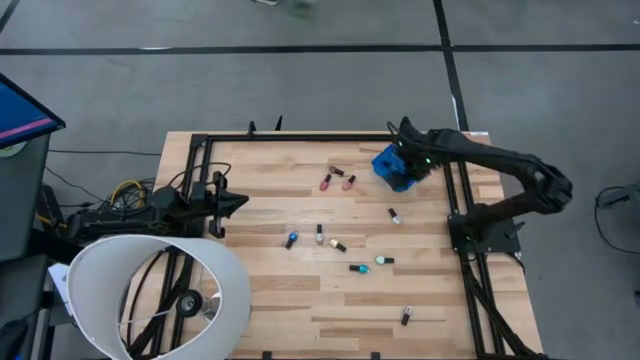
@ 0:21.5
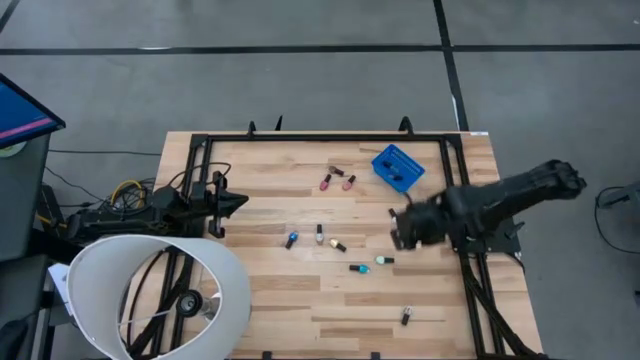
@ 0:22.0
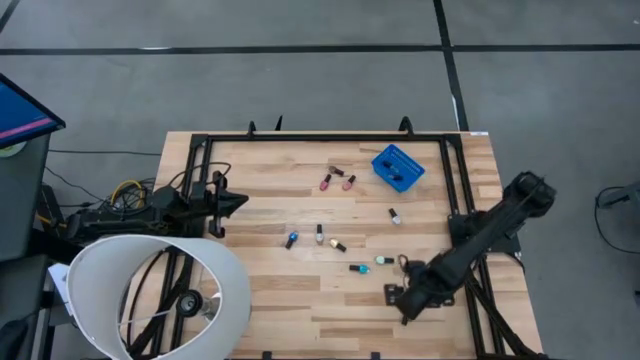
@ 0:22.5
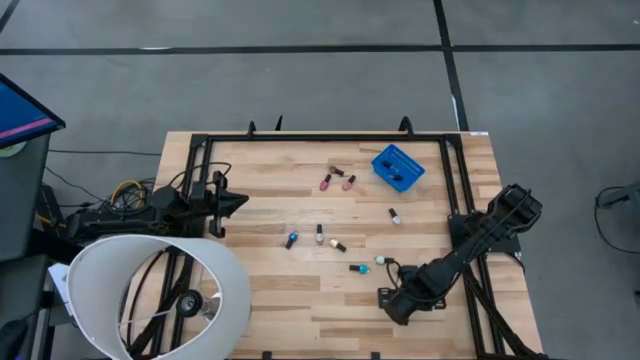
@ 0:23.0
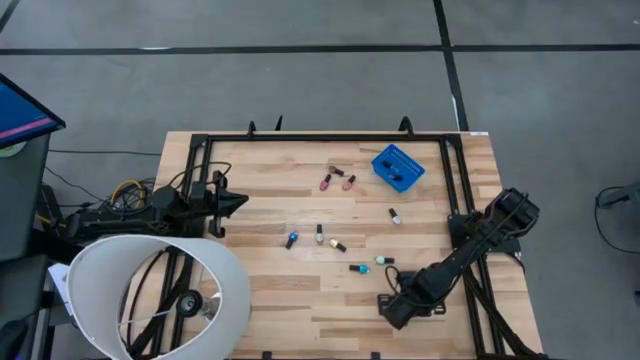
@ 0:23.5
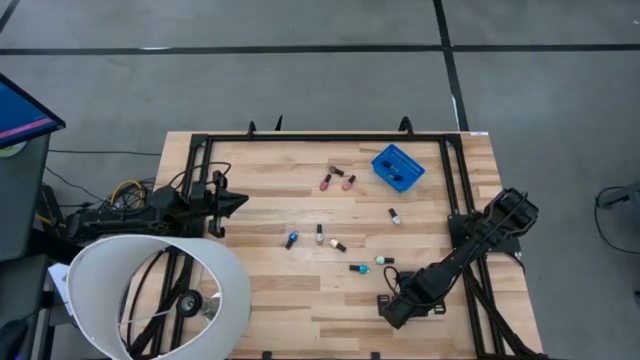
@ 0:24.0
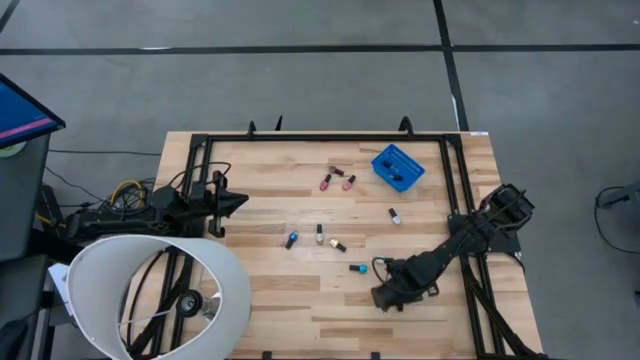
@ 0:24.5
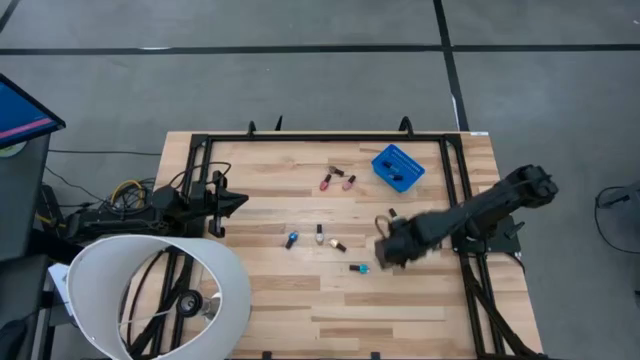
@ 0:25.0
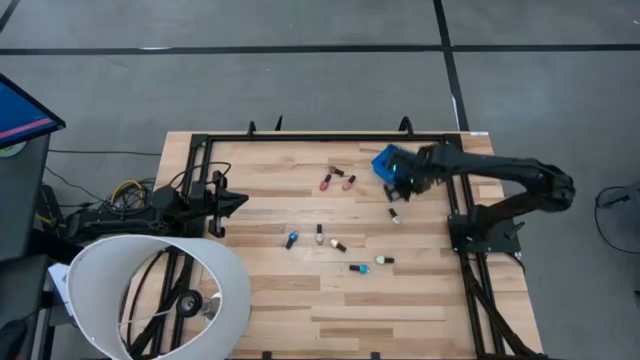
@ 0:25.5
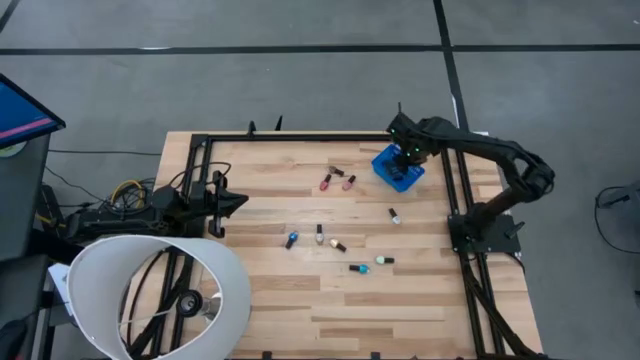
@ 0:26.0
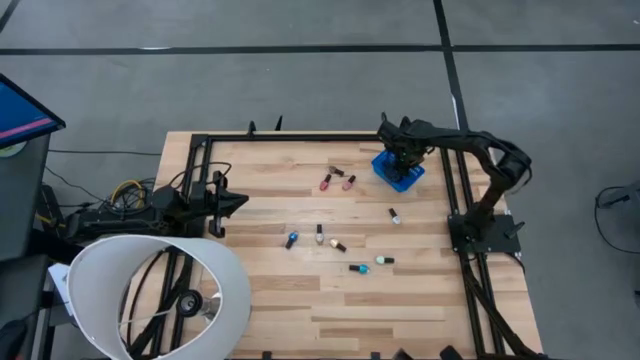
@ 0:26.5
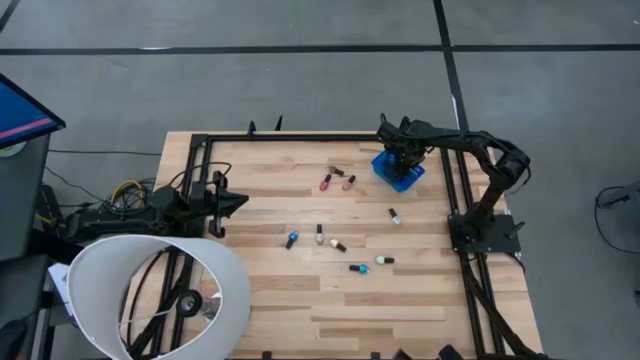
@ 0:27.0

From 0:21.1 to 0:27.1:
Task: Pick & Place Nail Polish
Put the transparent nail polish bottle into the blue bin

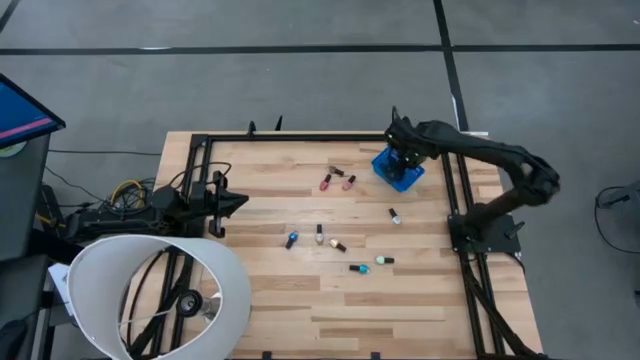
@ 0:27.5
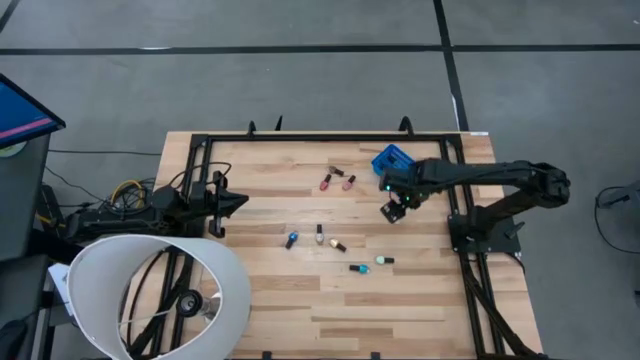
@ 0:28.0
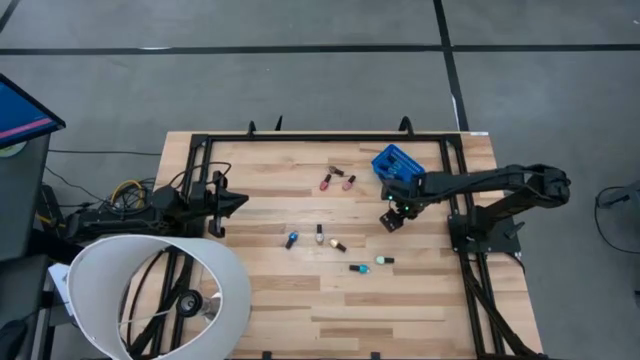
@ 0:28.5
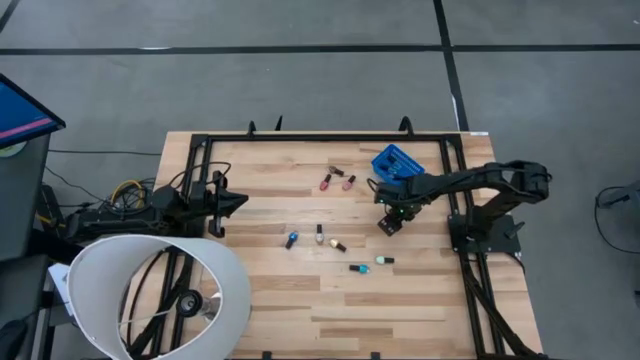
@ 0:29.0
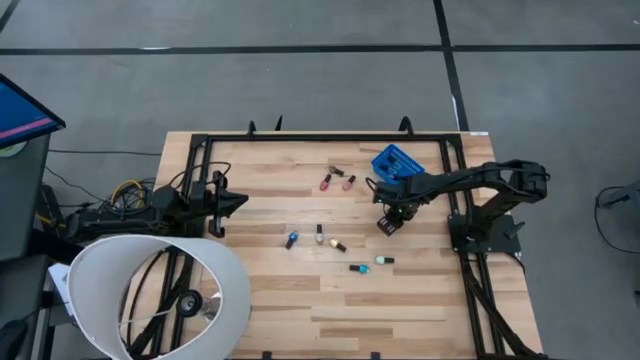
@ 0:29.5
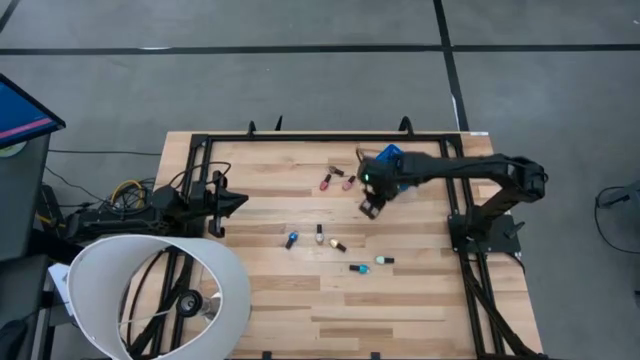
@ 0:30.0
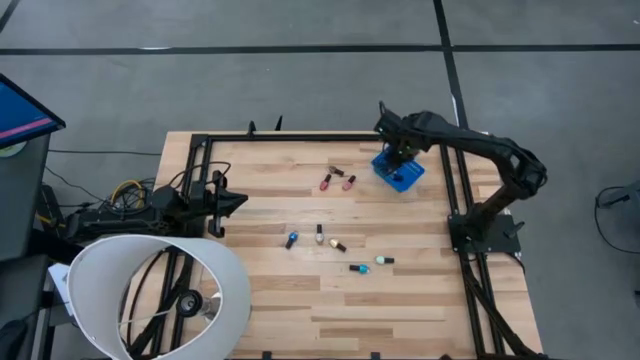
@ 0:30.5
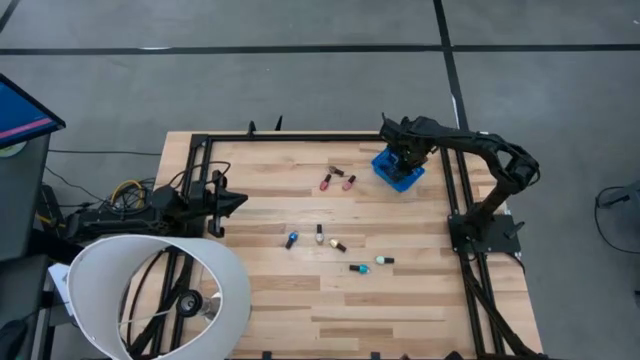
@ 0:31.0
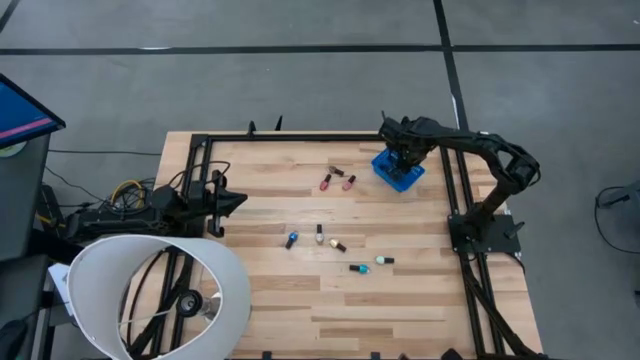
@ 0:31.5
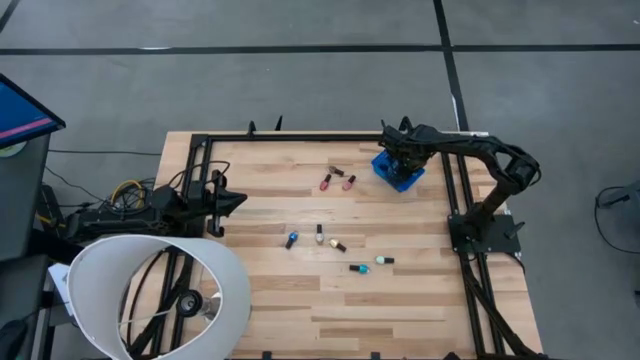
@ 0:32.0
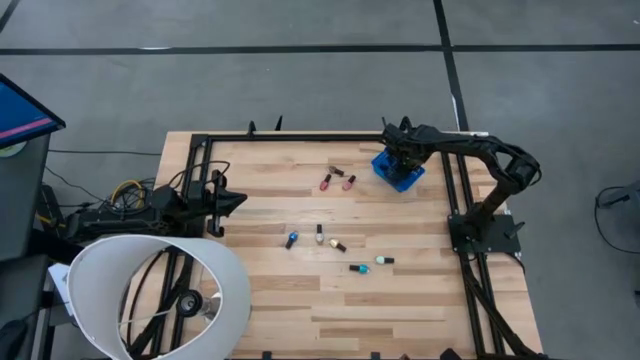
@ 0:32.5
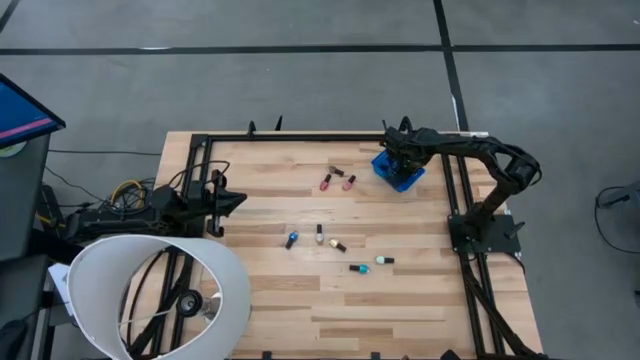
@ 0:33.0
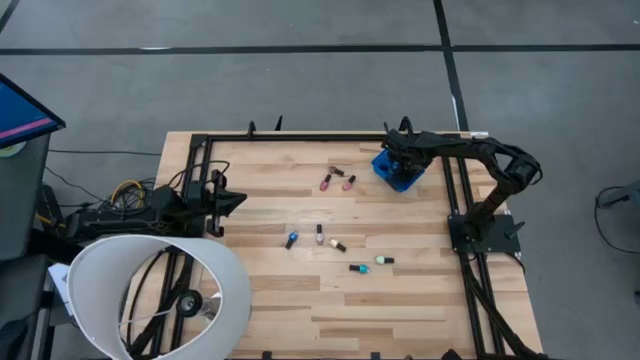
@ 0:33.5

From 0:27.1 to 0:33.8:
Put the white nail polish bottle into the blue bin

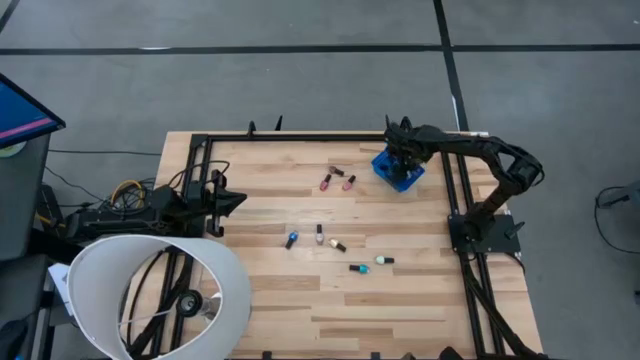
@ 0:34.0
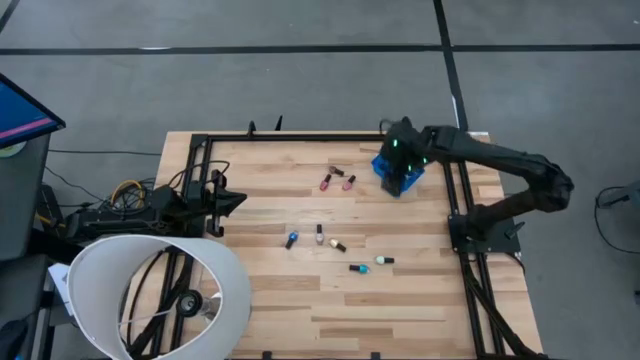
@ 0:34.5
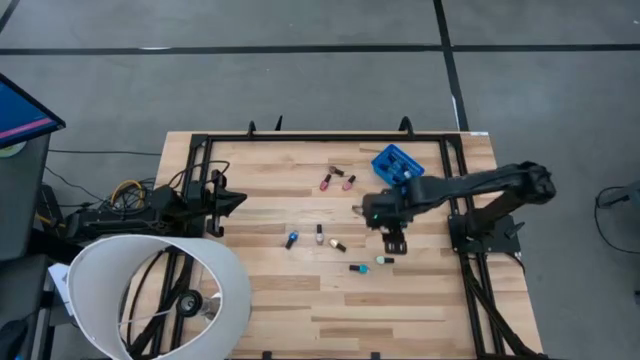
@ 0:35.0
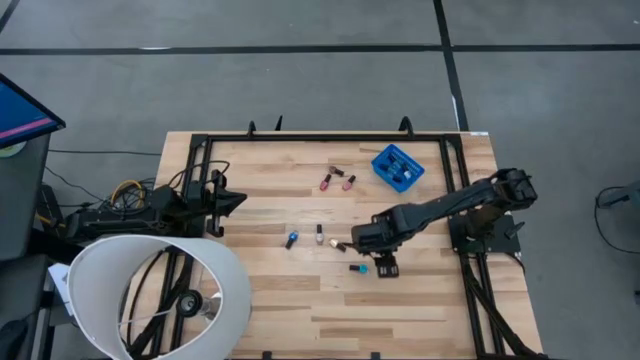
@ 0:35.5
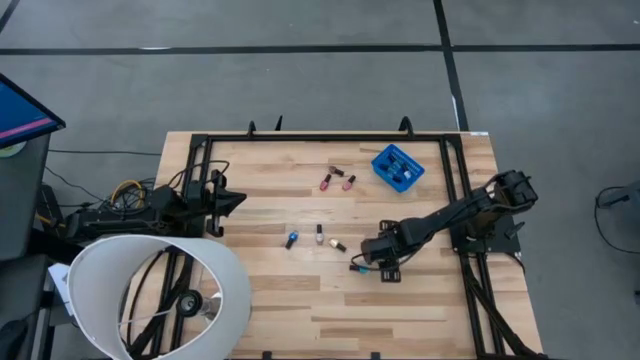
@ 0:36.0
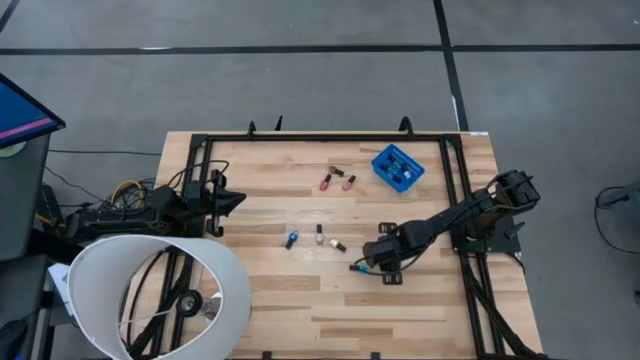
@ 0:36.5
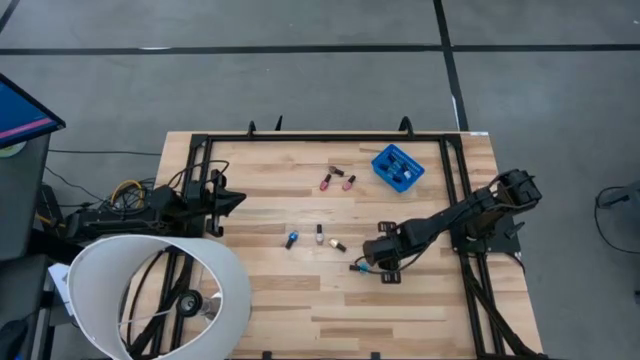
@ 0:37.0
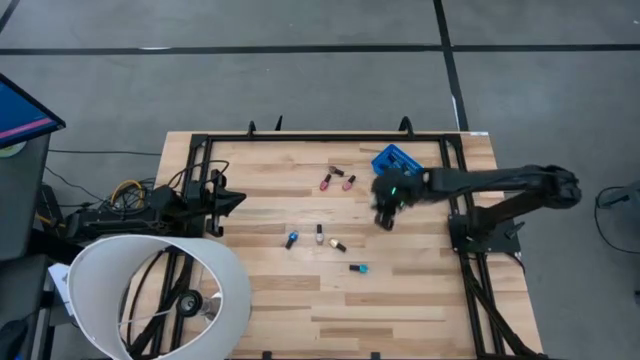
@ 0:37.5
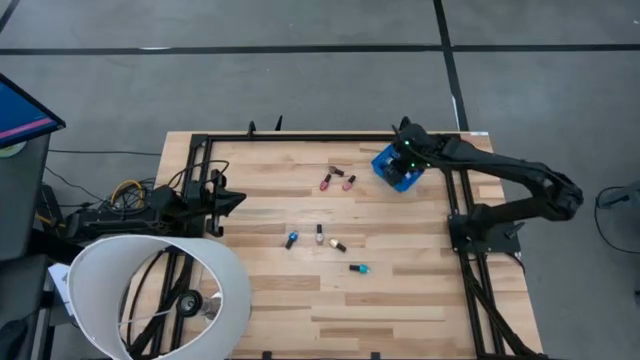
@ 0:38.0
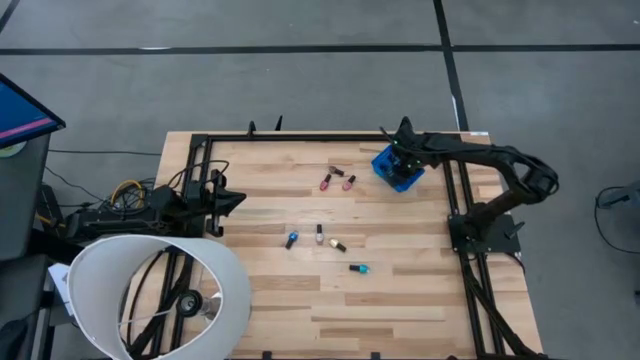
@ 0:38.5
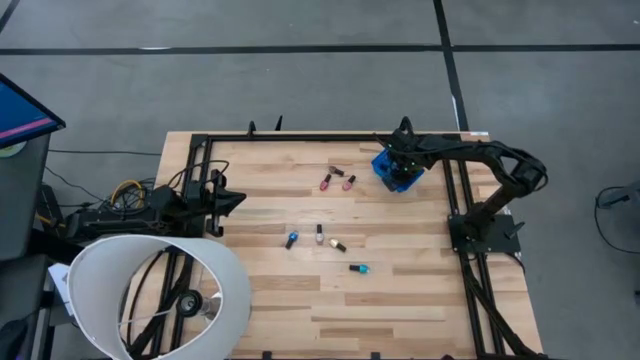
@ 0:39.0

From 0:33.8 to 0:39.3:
Put the light green nail polish bottle into the blue bin

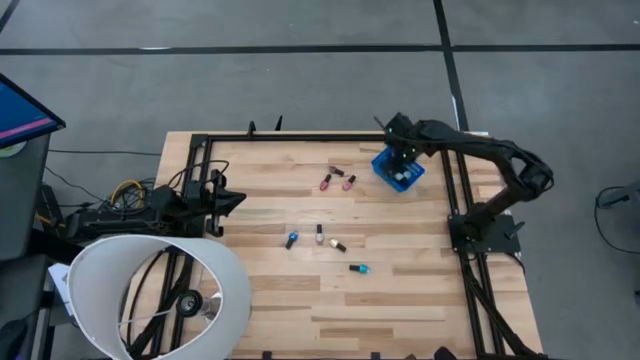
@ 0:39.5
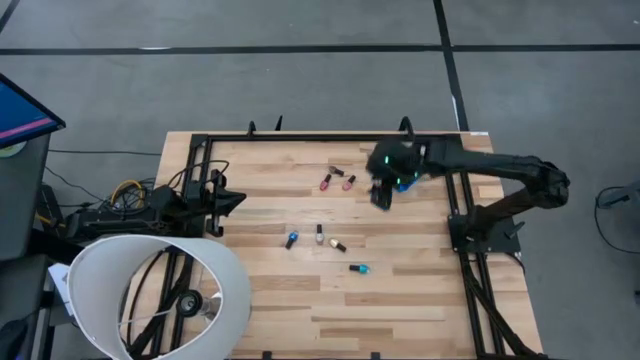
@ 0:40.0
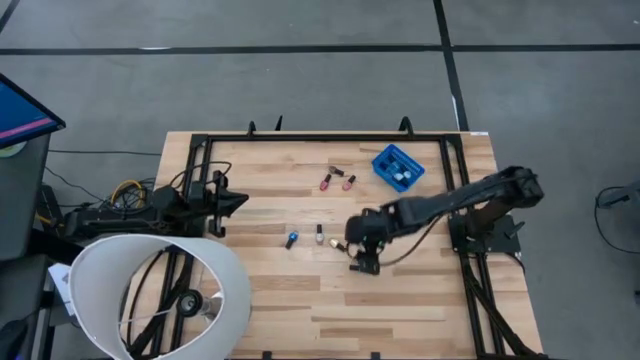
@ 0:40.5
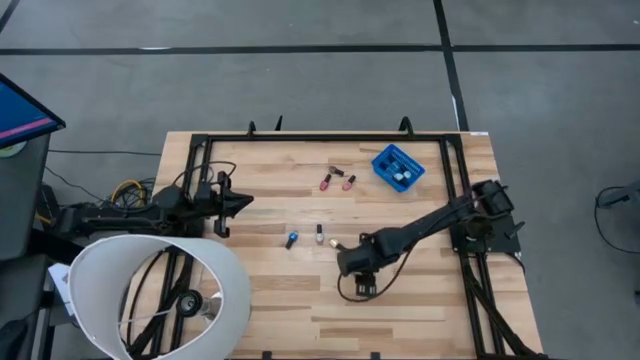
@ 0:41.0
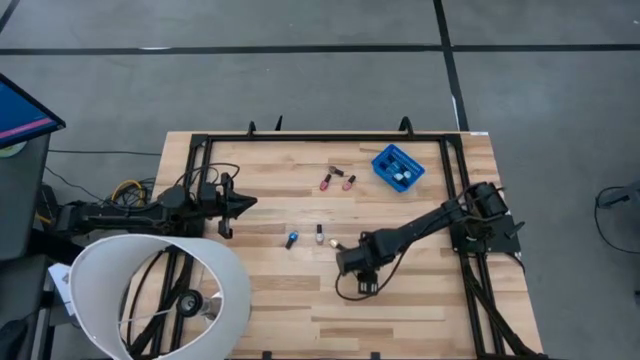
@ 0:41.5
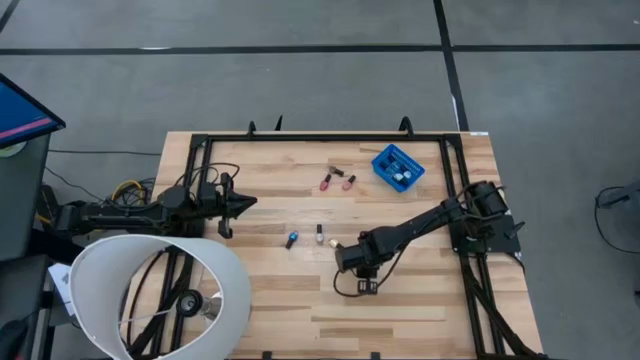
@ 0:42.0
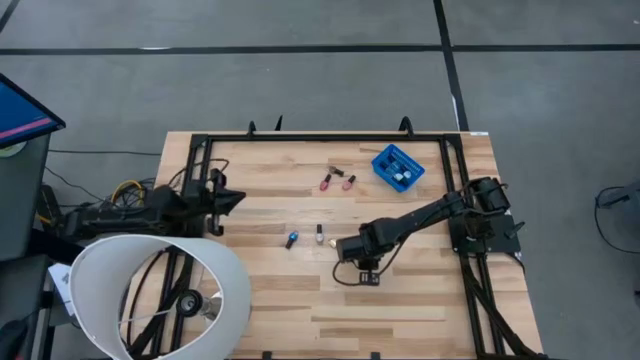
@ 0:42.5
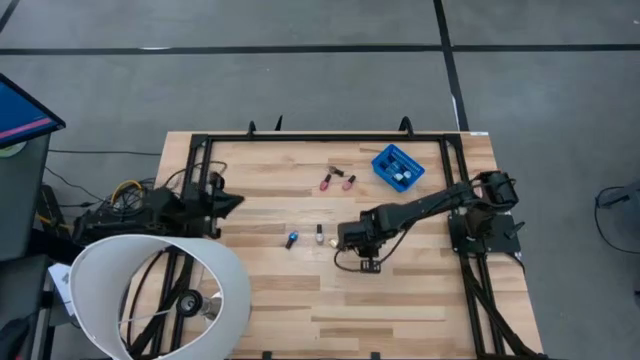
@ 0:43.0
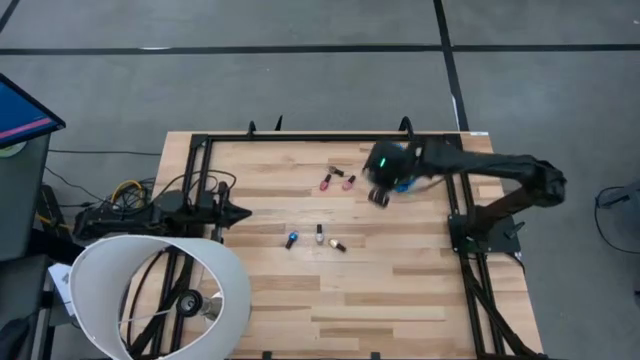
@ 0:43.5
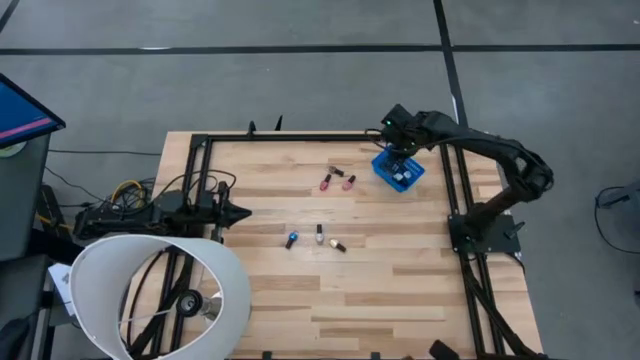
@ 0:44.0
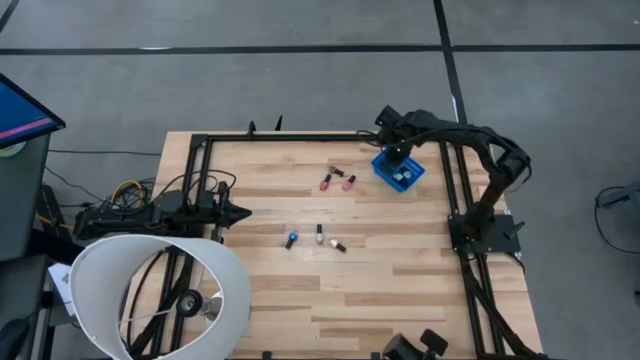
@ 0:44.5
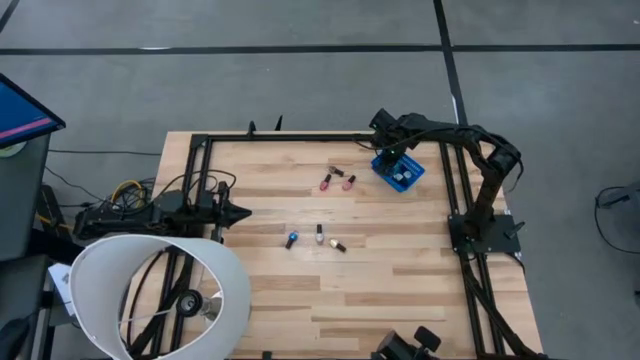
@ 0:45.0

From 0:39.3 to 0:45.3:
Put the light blue nail polish bottle into the blue bin
